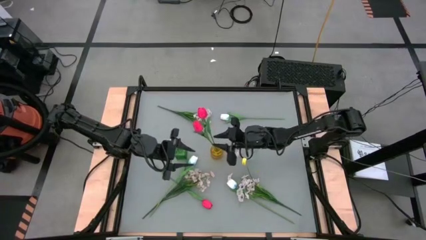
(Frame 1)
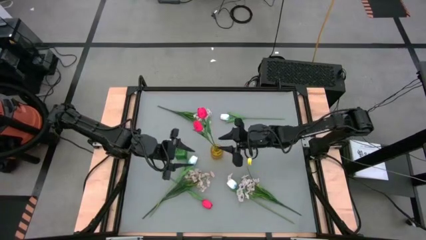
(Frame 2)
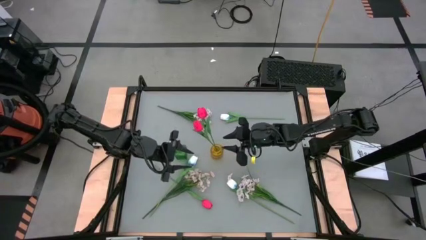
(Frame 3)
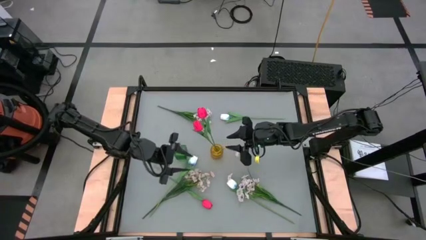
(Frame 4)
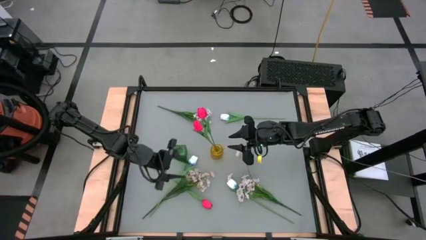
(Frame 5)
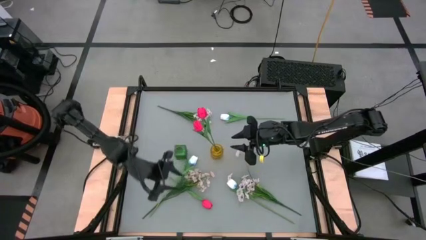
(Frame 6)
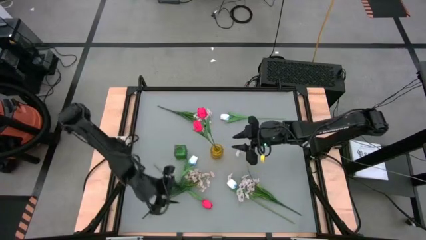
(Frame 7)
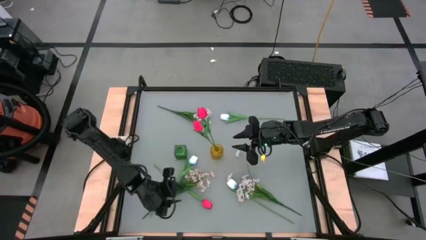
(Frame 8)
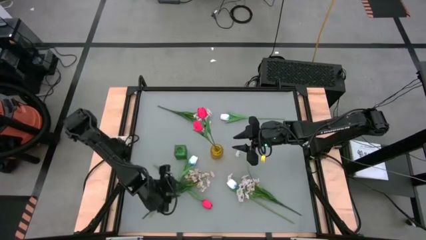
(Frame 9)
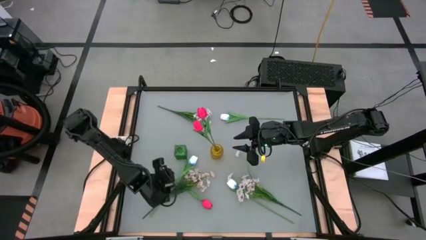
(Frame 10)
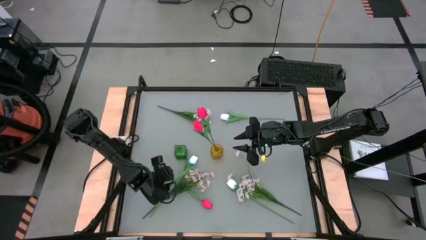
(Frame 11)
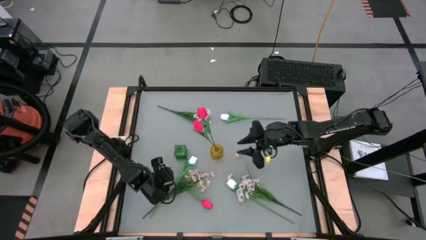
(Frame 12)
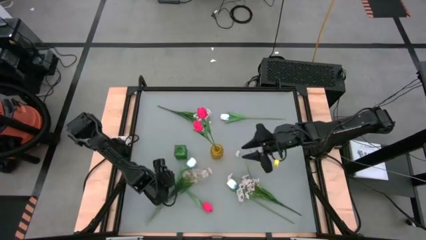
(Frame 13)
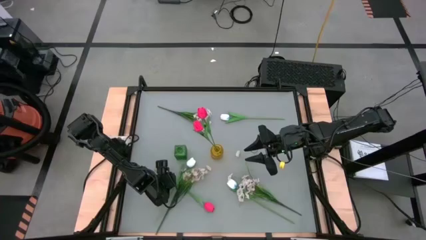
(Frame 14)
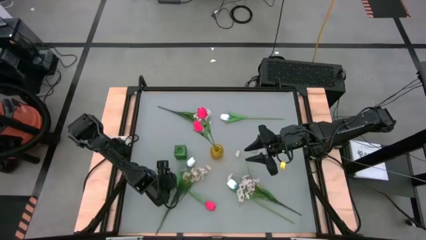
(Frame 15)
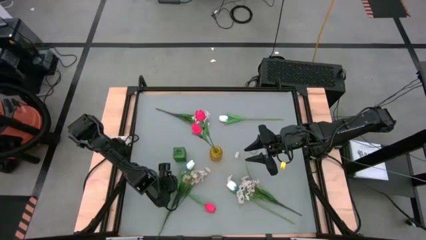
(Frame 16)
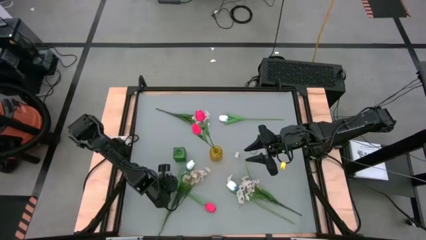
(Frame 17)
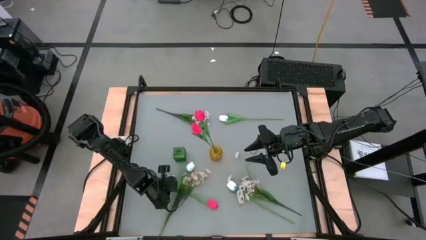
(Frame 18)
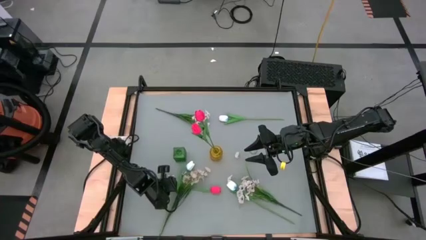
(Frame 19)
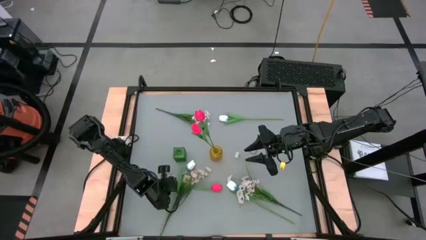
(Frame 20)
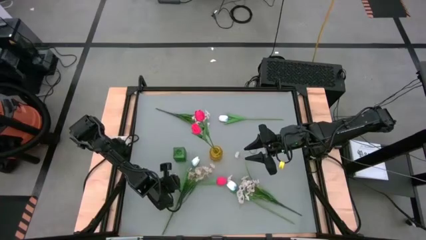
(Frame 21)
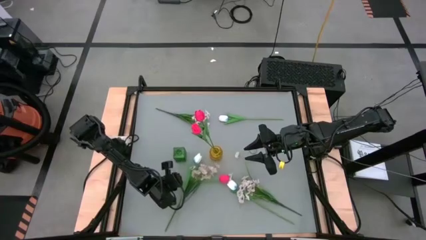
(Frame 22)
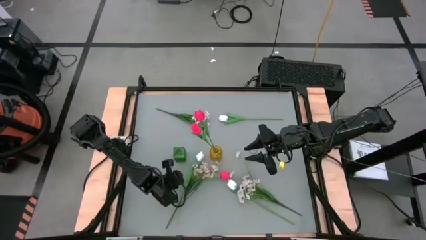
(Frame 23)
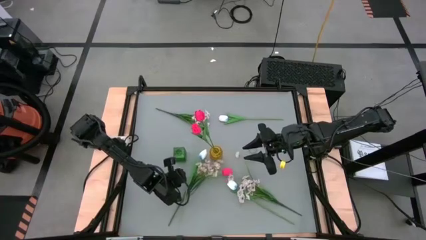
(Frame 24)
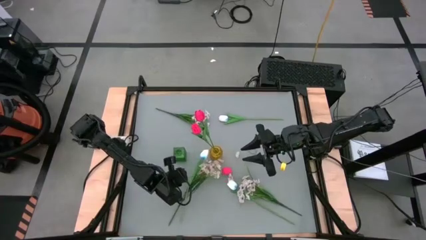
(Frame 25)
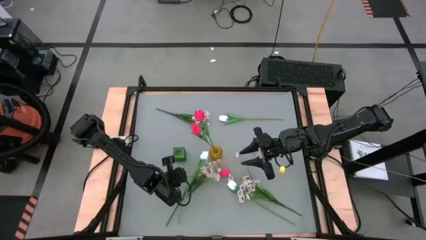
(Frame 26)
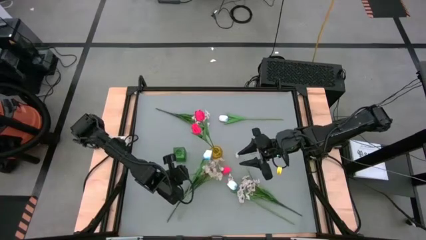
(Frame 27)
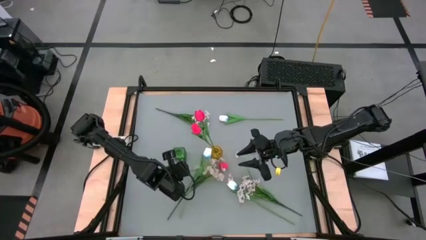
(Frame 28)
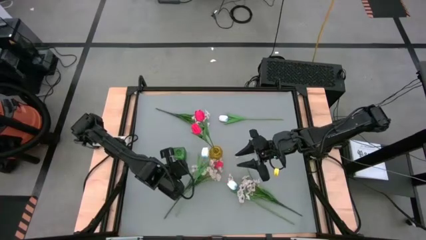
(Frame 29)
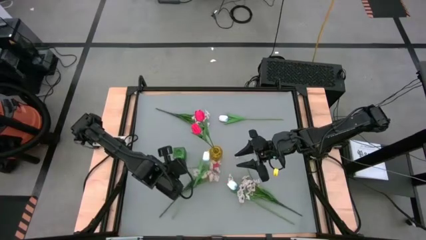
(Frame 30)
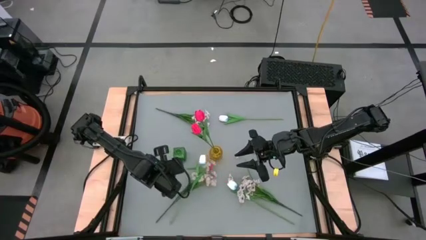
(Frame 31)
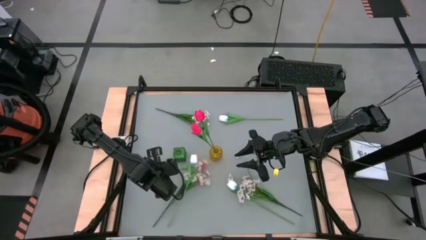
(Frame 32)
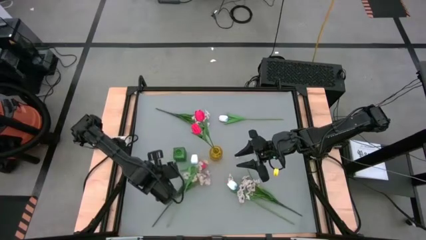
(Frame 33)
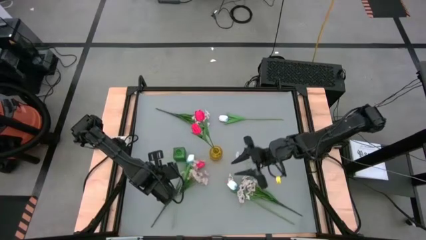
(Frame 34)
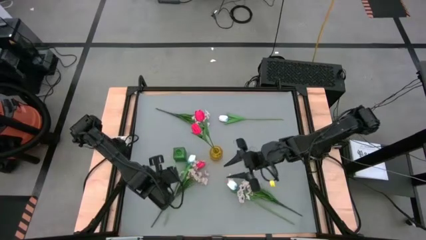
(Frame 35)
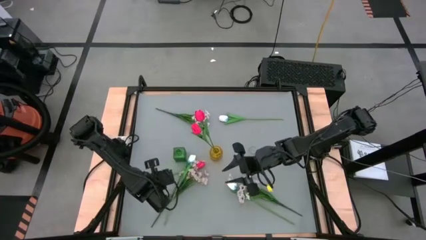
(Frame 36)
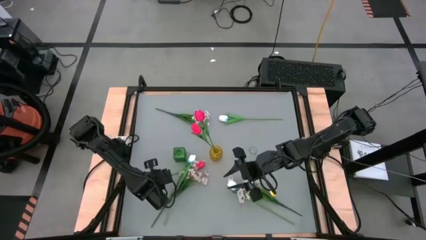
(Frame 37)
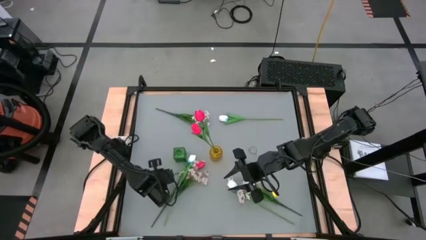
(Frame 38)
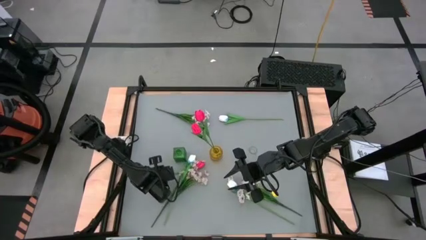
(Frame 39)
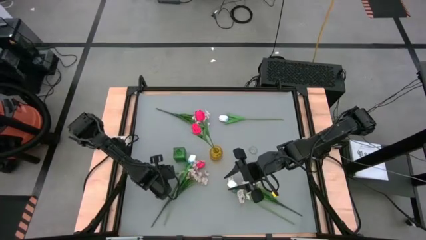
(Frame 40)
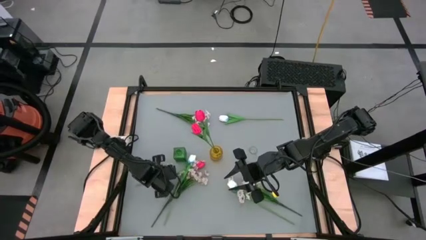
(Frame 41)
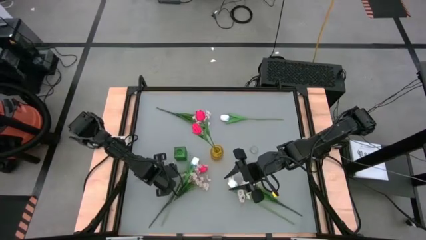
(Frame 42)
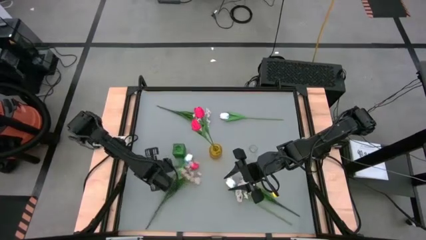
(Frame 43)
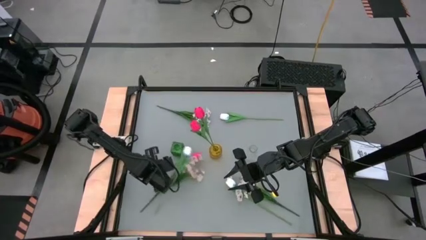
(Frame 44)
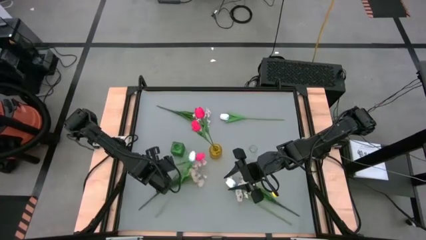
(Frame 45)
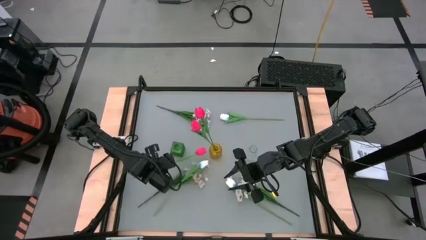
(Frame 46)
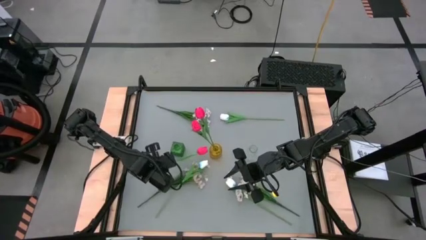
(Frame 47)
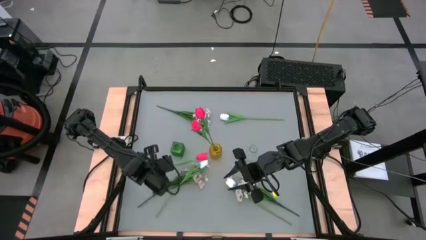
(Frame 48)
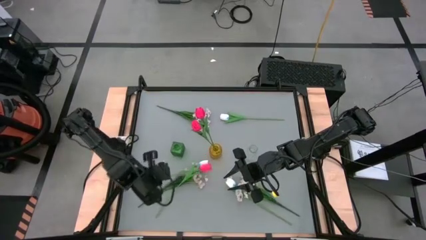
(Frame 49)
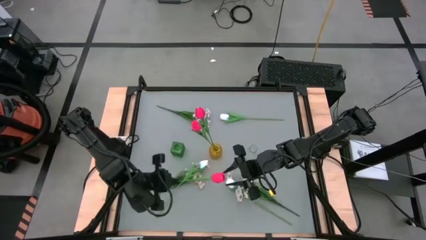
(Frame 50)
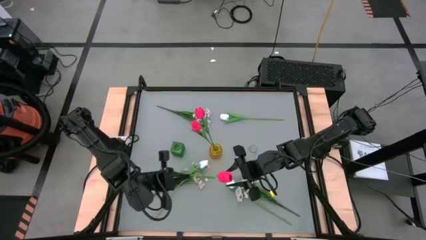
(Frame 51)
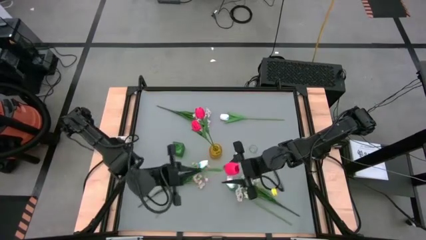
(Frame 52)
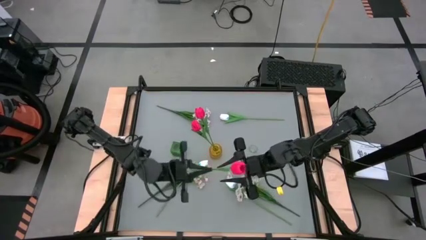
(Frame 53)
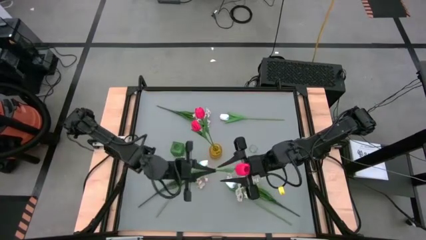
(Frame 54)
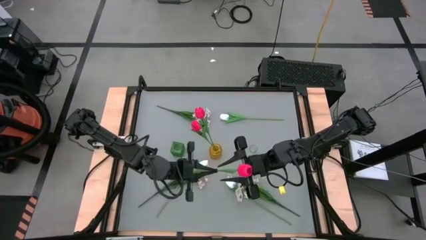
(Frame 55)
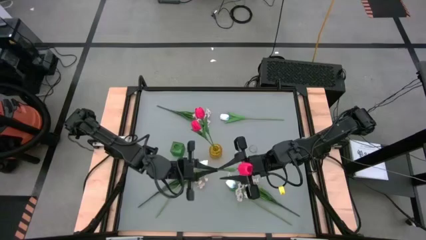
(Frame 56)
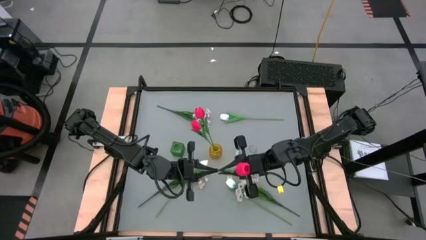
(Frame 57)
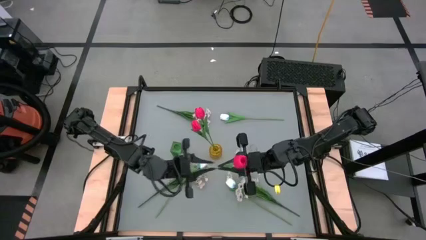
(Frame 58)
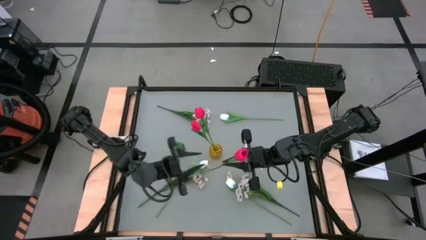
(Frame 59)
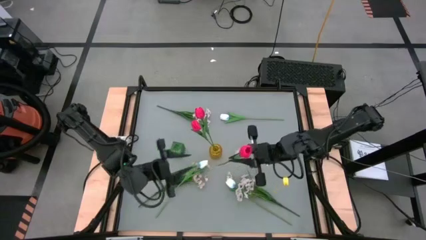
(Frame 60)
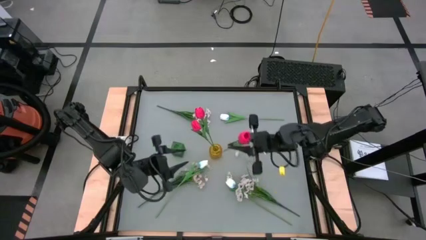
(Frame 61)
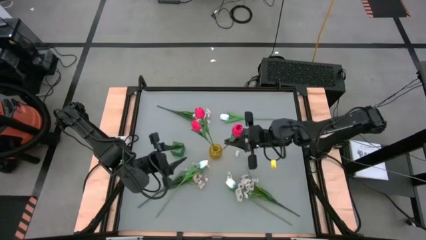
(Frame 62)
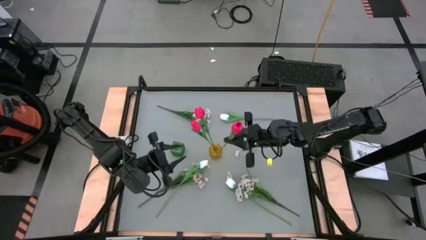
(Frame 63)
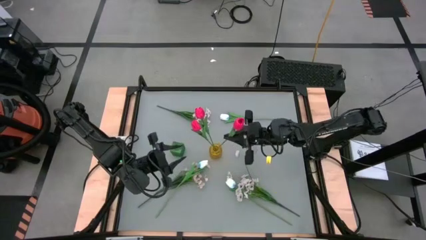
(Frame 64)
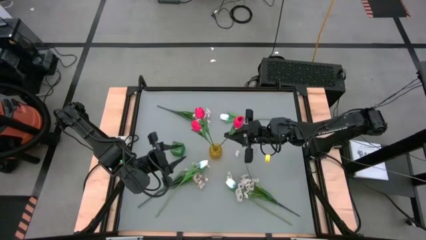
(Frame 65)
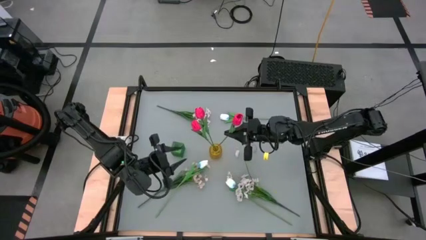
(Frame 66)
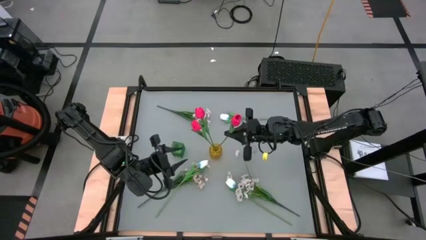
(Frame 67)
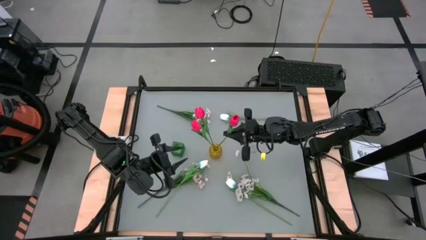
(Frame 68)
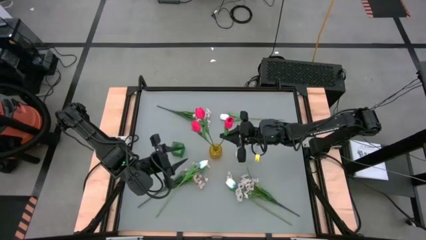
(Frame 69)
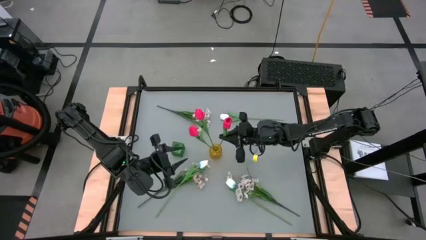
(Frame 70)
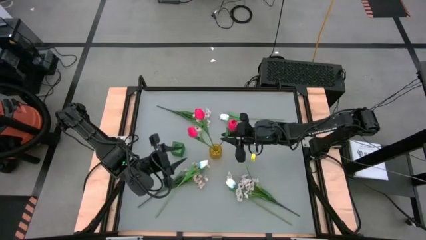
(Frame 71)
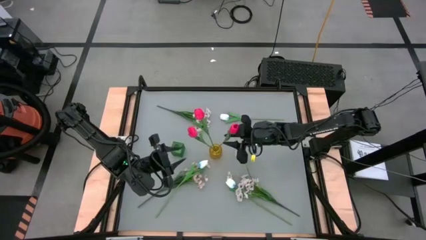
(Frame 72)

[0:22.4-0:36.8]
Task: Sort flowers into vase by color
Put the pink flower into the yellow flower vase

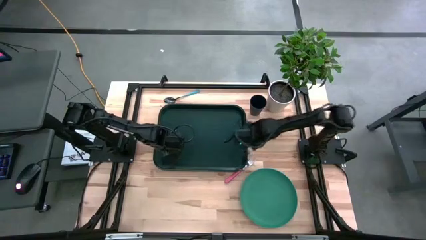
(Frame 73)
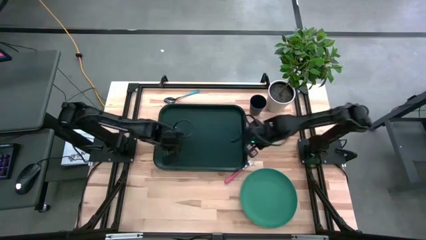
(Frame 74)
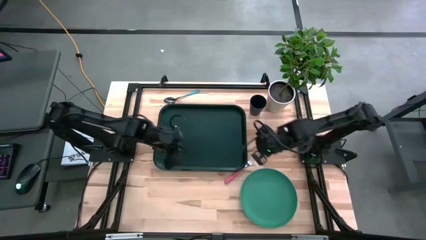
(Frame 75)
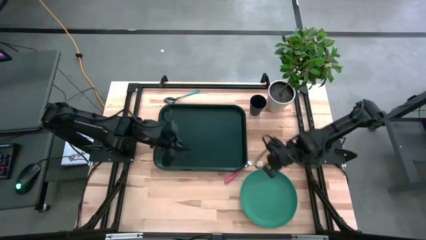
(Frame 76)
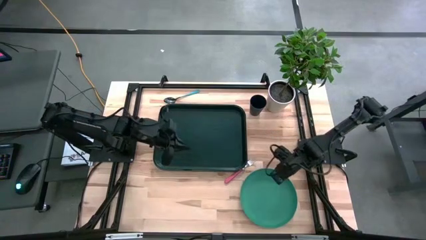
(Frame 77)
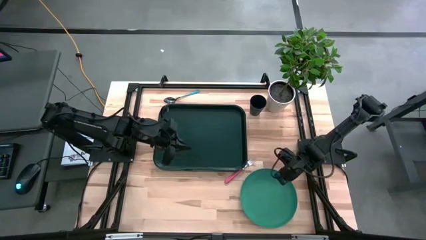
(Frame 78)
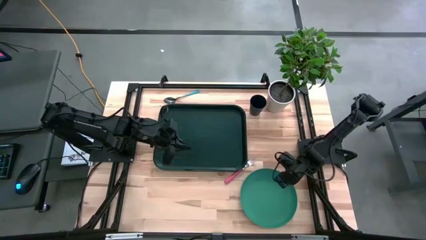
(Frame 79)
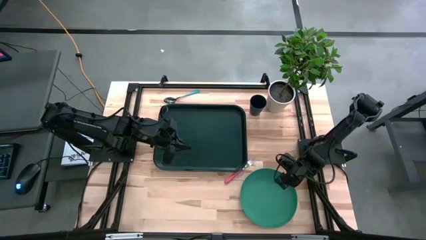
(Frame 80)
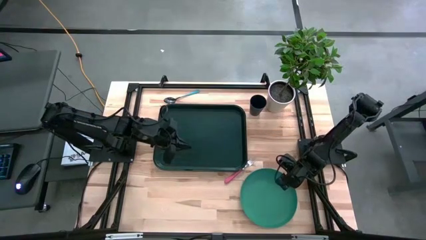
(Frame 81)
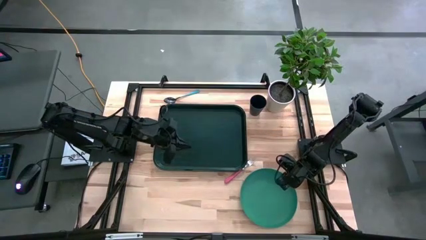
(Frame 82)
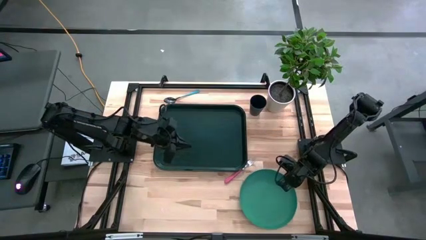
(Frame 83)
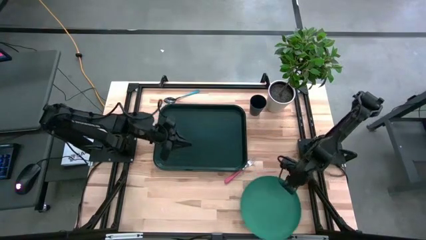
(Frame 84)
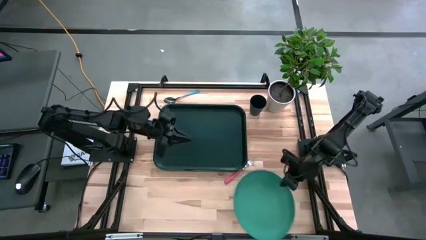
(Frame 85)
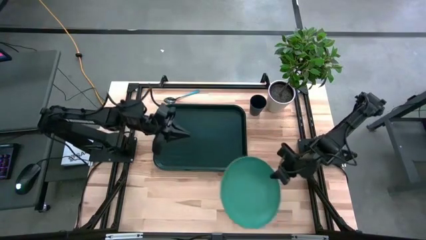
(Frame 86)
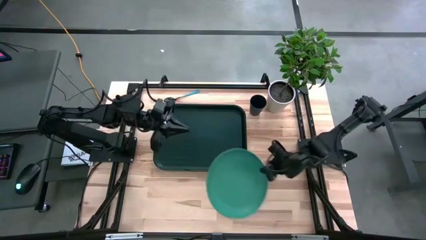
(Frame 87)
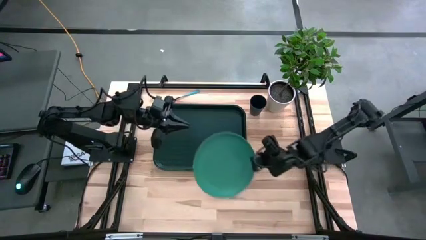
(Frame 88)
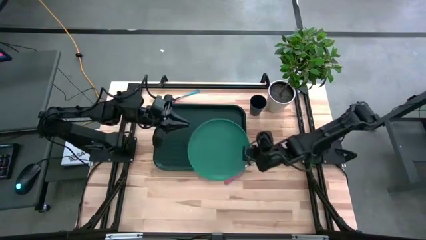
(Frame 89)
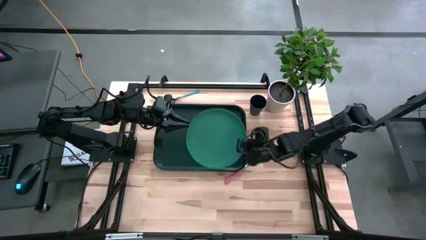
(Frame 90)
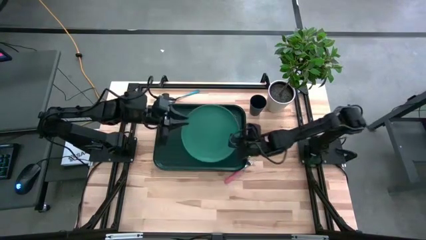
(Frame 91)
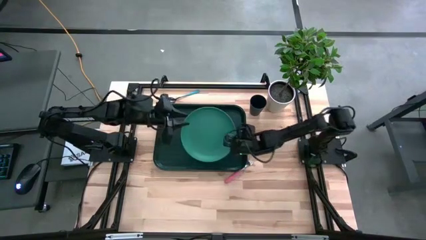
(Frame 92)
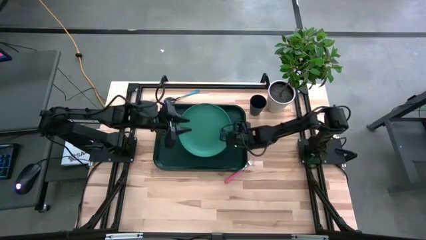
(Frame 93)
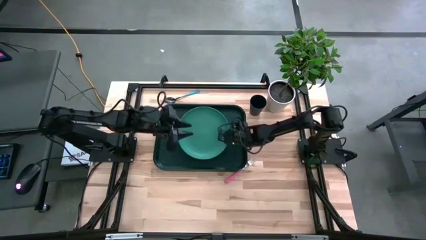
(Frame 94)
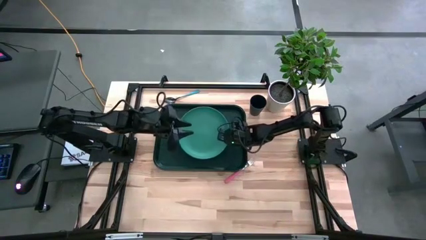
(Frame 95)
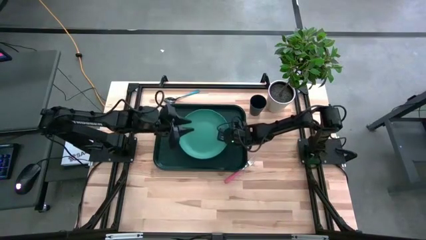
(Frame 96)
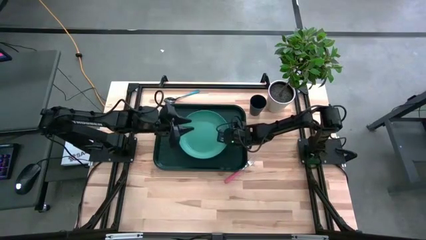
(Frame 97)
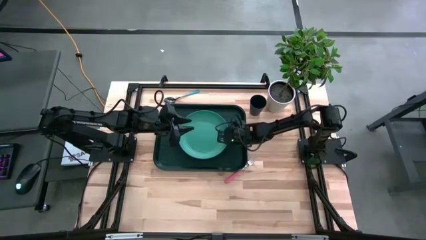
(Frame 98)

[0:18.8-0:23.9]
Task: Pick and place plate/cup/fork/spoon on tray
Put the green plate on the black serving tray
